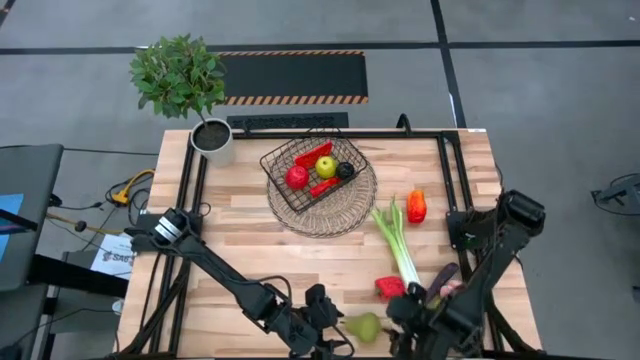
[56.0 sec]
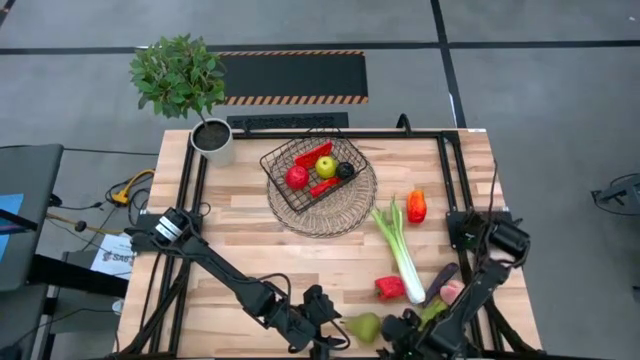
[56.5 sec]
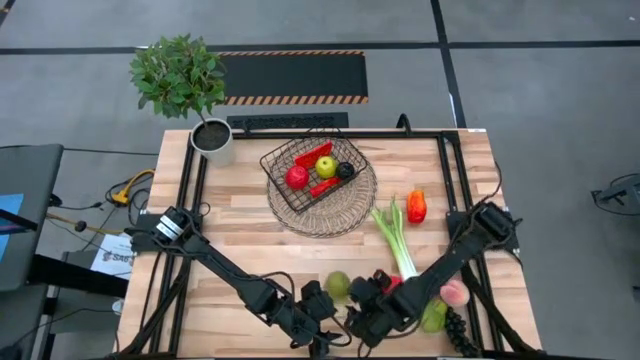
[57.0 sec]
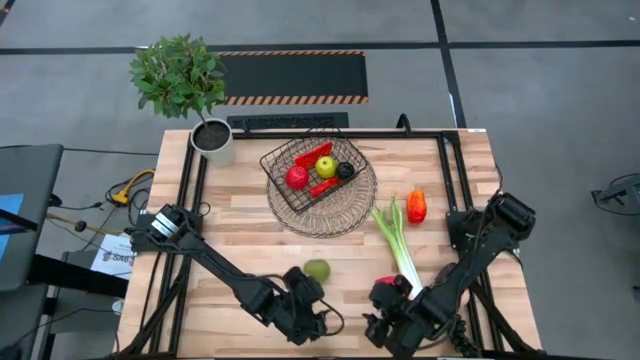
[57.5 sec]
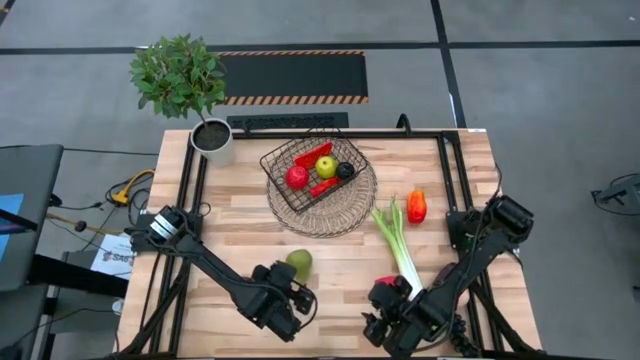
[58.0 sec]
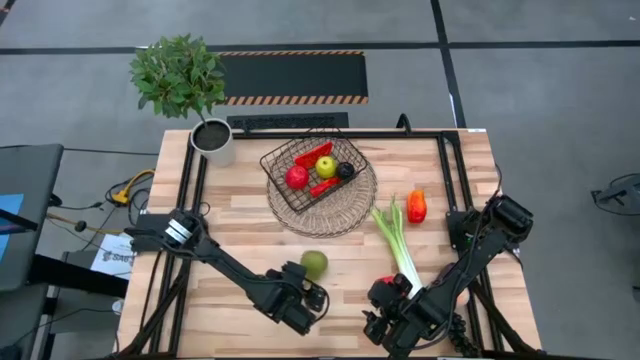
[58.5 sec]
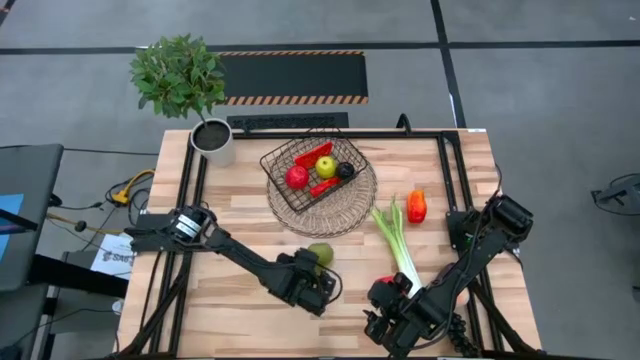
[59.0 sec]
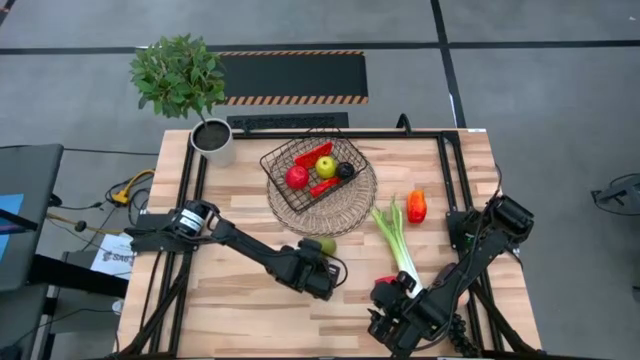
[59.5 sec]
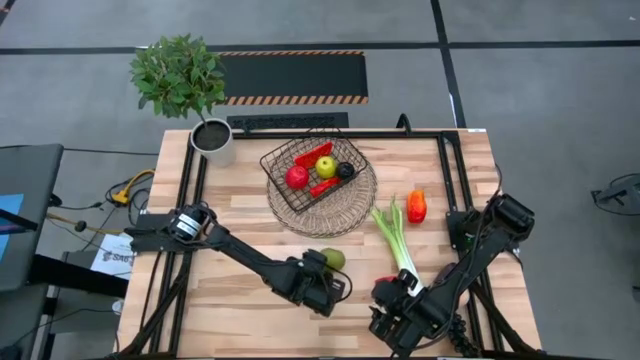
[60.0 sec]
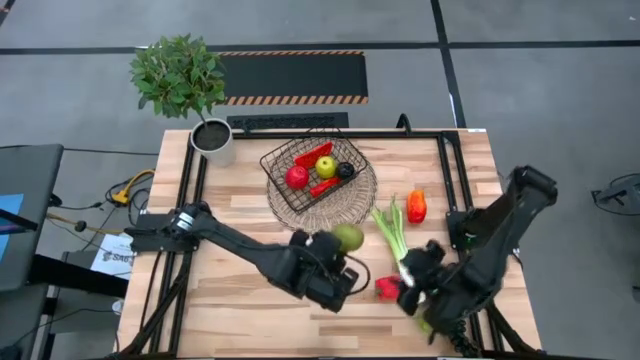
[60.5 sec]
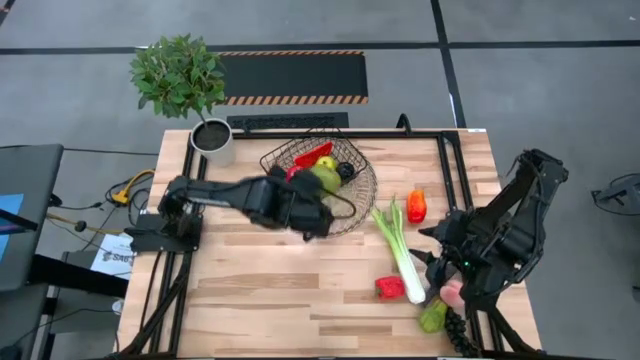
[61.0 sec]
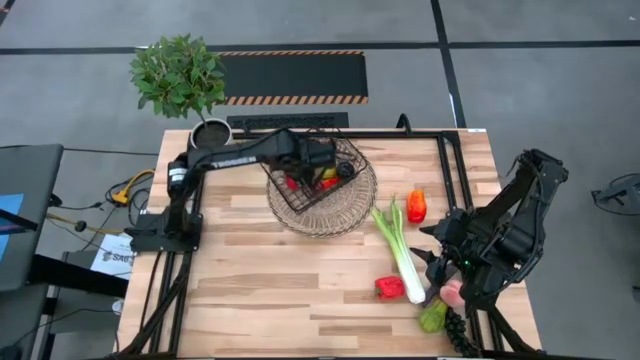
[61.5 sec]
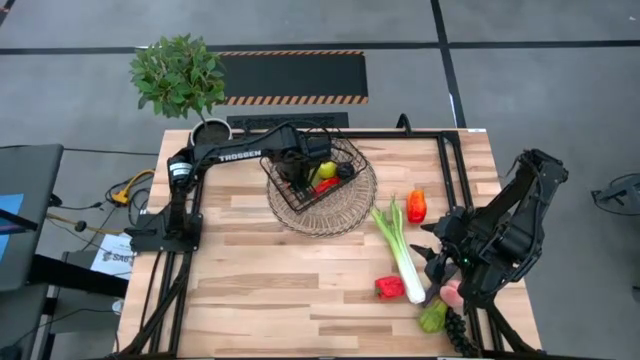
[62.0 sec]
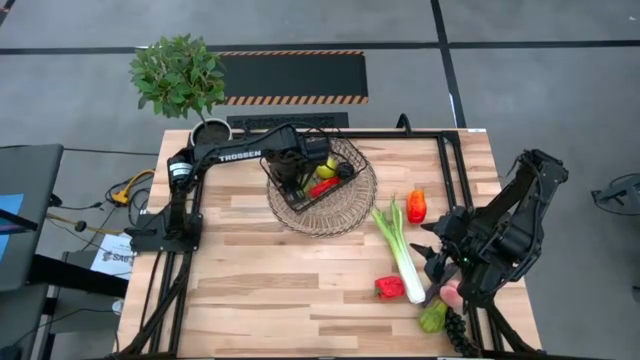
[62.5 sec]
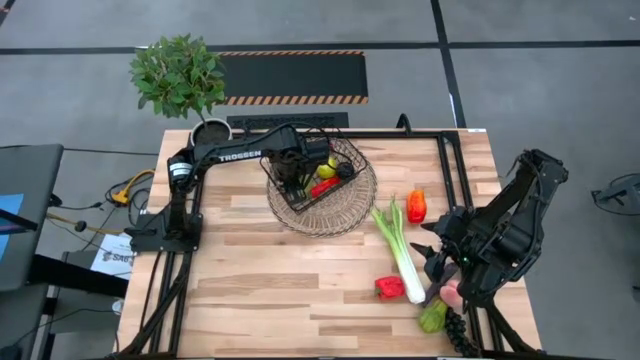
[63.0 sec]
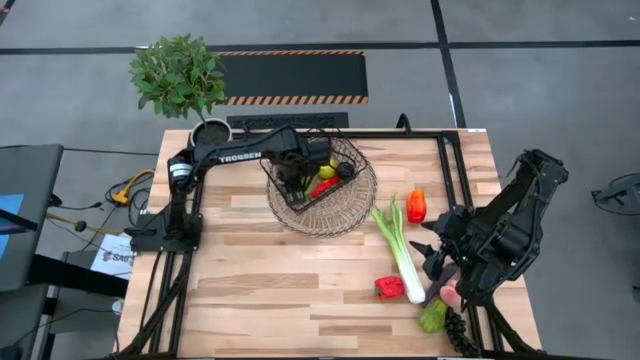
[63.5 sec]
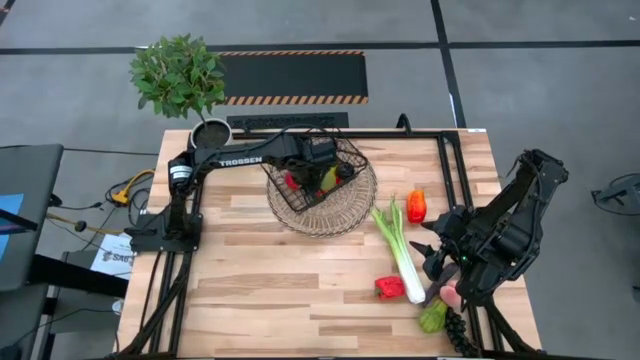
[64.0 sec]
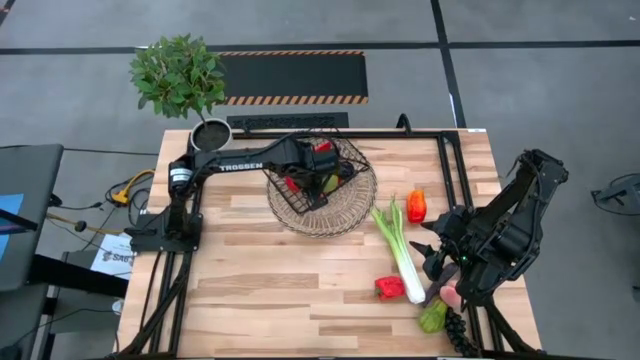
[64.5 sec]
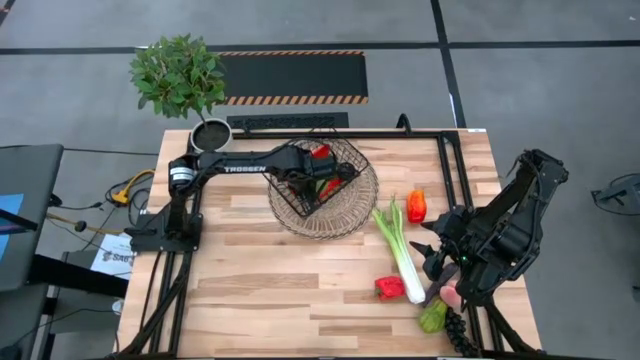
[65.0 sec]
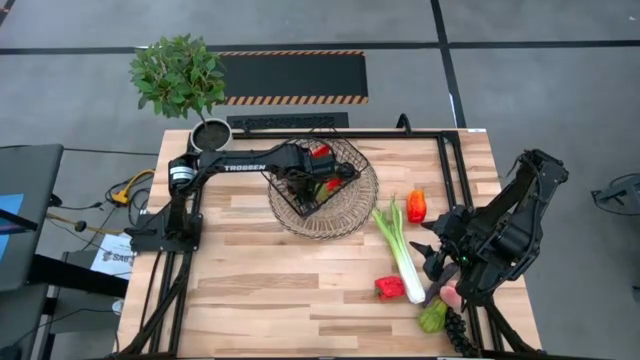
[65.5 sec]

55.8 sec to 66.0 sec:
Task: Build produce basket
Put the green pear into the wire basket

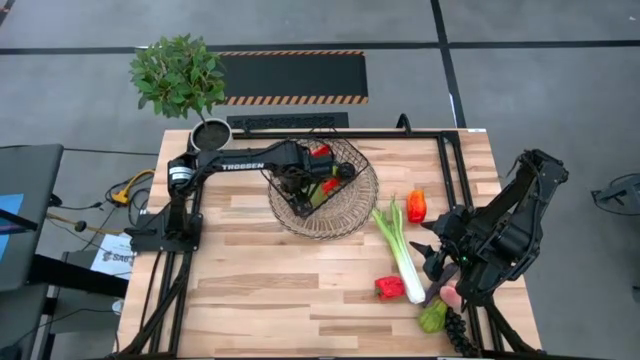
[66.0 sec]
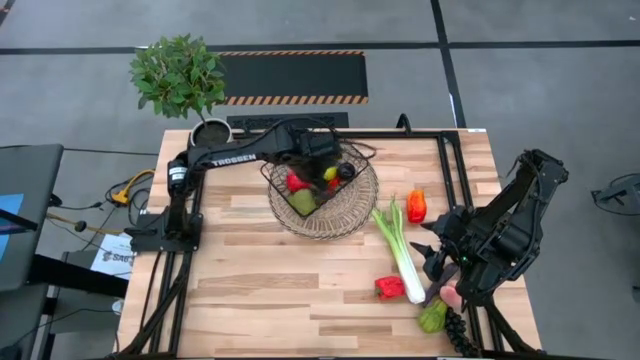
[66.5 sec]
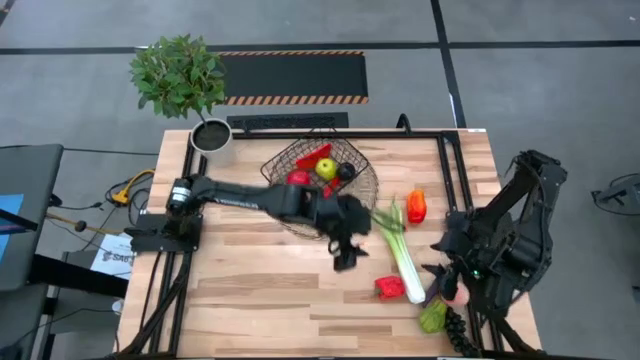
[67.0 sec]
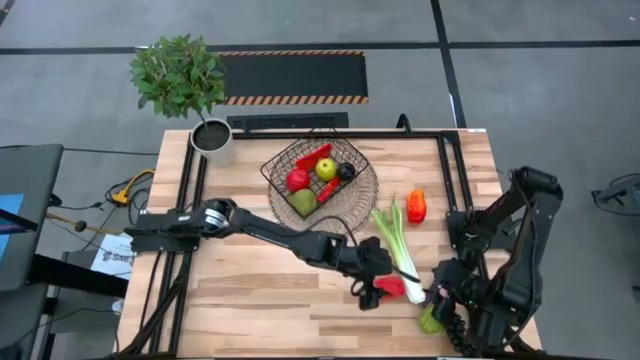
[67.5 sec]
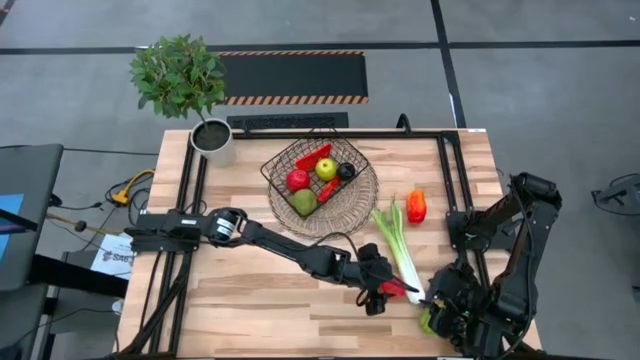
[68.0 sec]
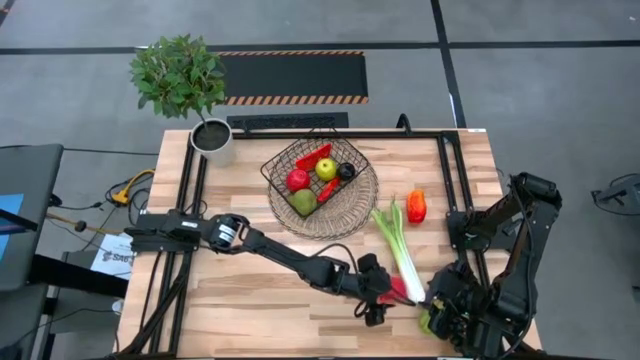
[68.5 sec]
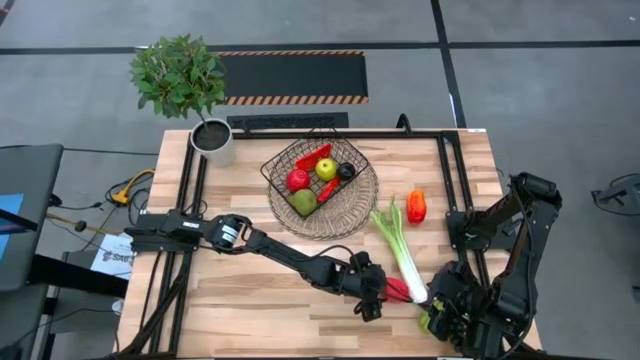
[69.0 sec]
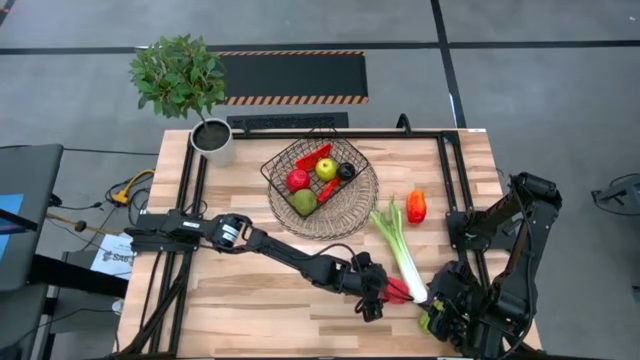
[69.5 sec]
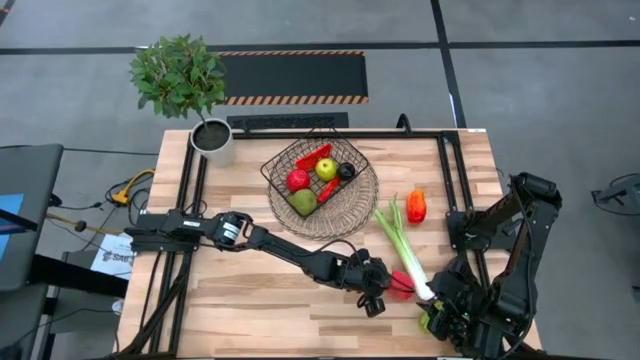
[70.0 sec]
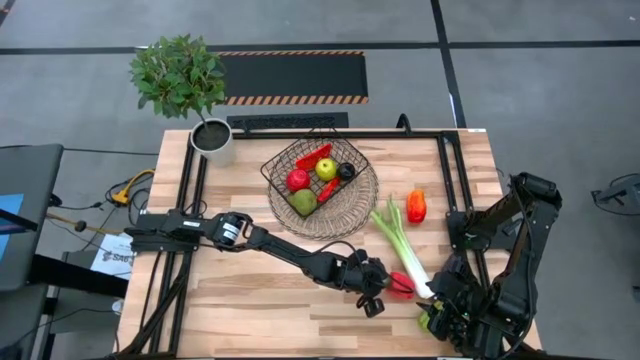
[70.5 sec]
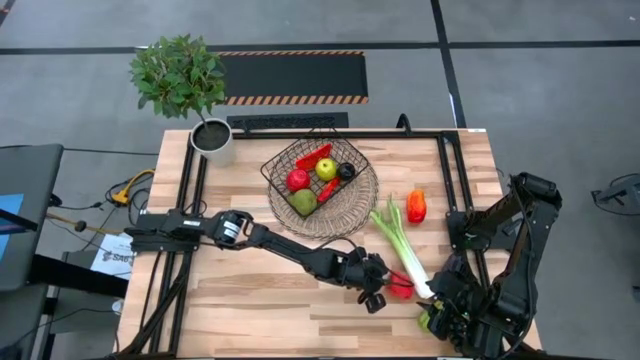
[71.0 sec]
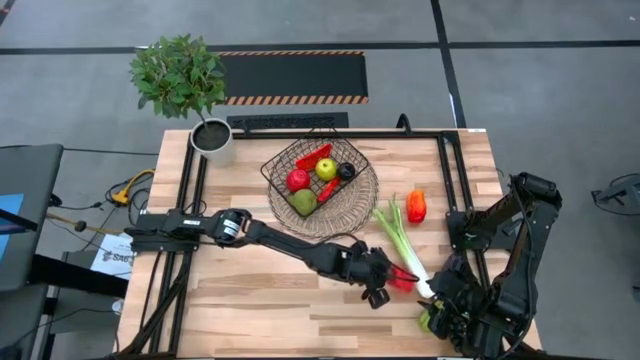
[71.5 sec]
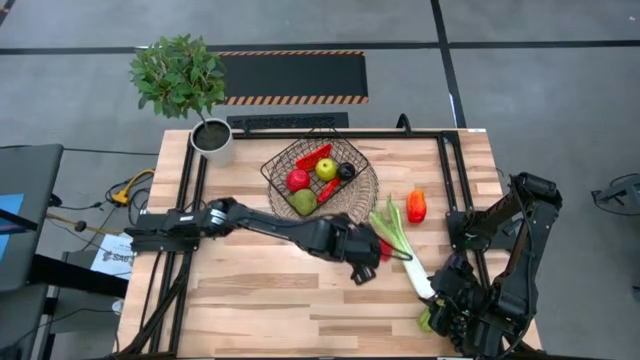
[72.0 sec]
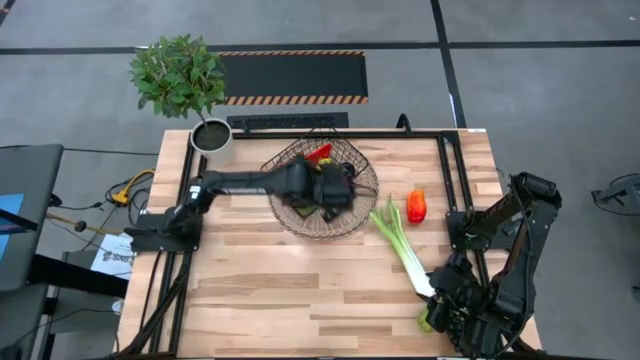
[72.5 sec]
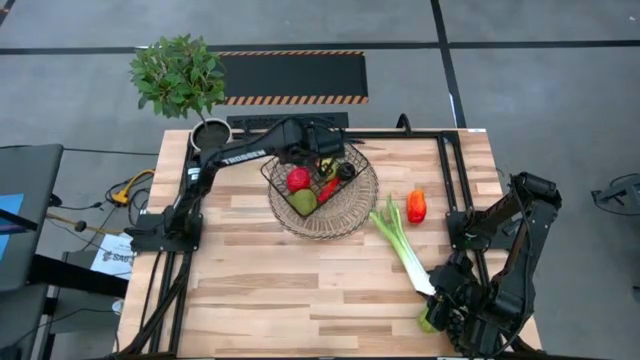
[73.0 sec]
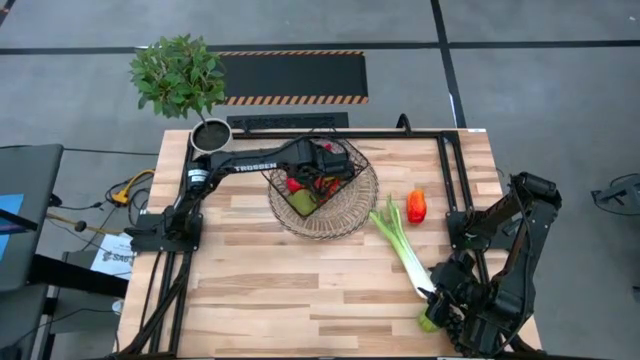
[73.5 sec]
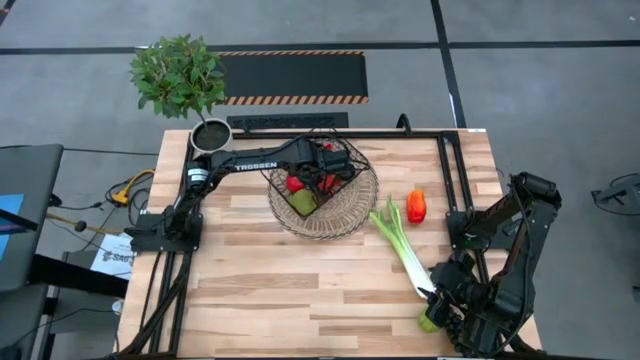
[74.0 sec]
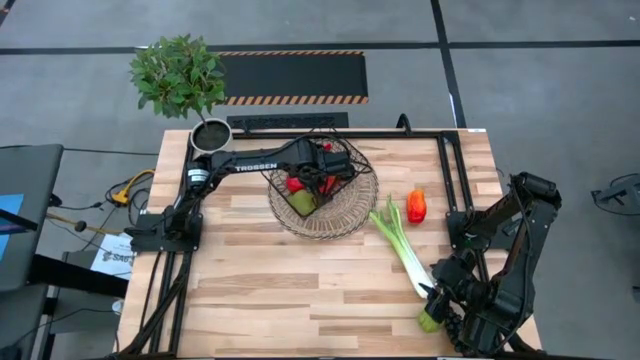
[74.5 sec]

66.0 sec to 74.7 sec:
Put the red bell pepper into the wire basket

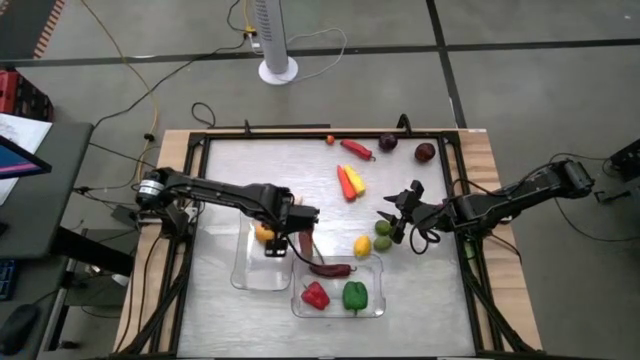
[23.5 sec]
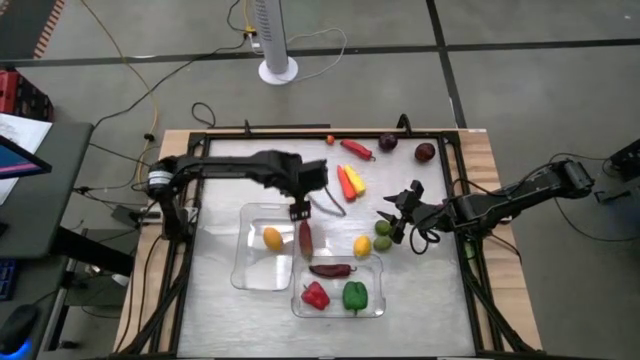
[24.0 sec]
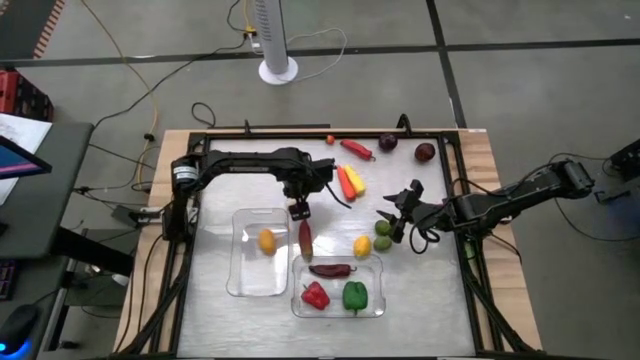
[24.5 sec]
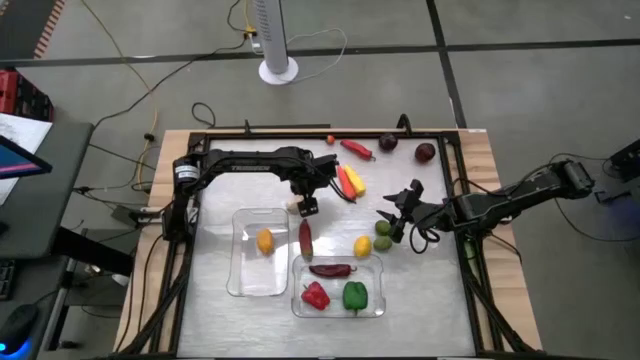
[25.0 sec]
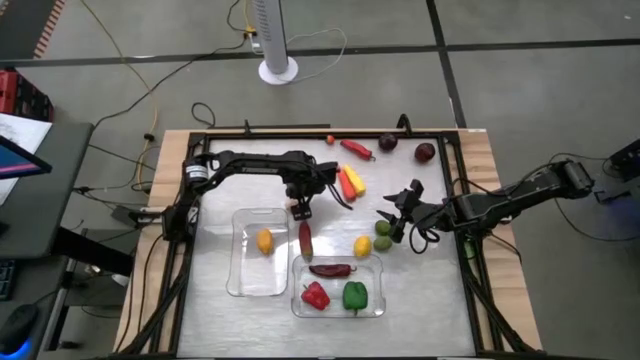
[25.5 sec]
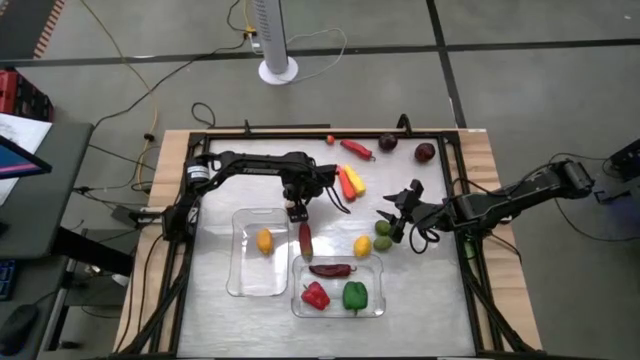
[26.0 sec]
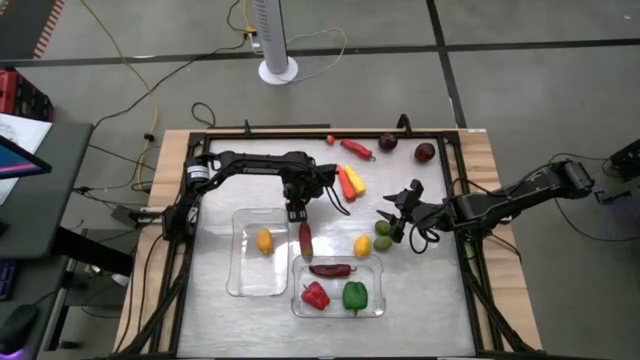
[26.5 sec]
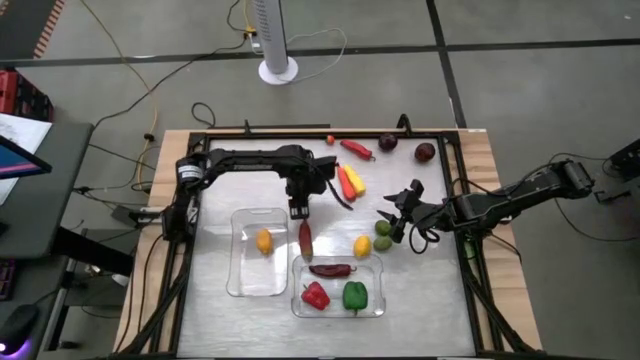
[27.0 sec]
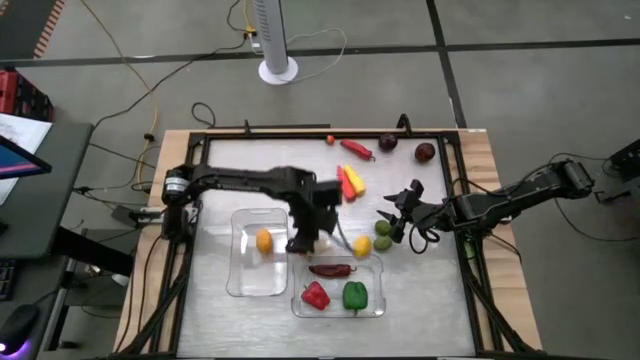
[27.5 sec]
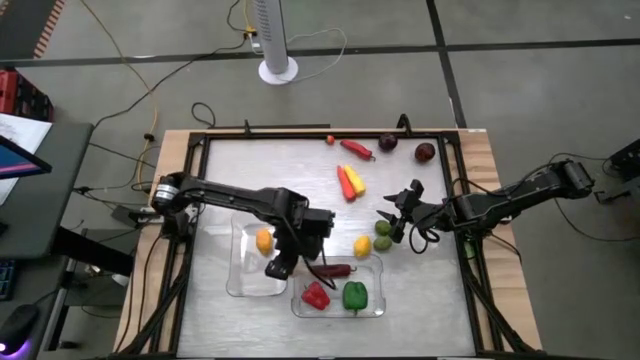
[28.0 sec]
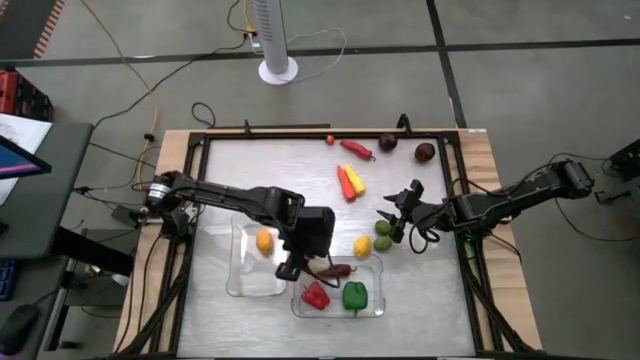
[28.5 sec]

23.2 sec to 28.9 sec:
Task: Sort produce into baskets
Put the white garlic into the right transparent bin
